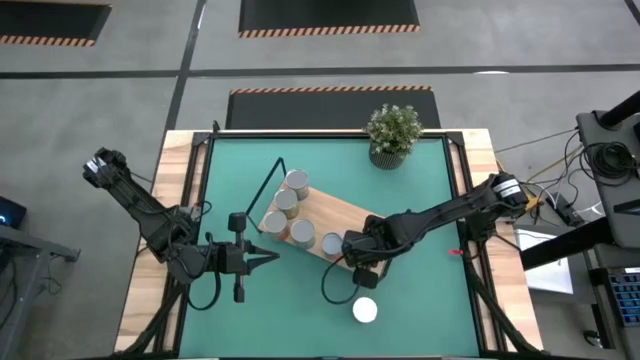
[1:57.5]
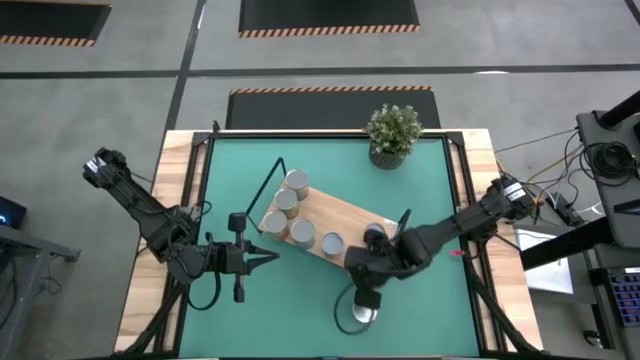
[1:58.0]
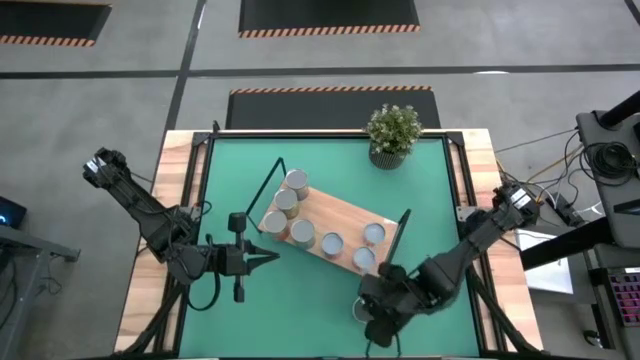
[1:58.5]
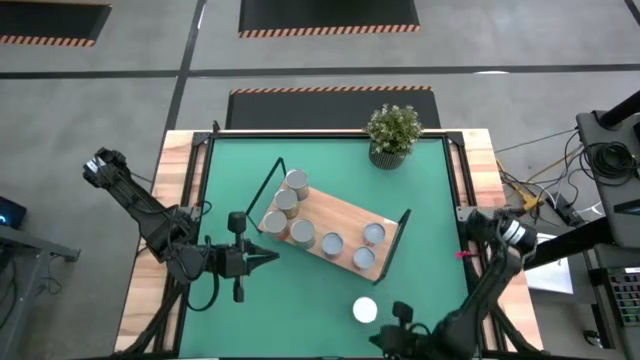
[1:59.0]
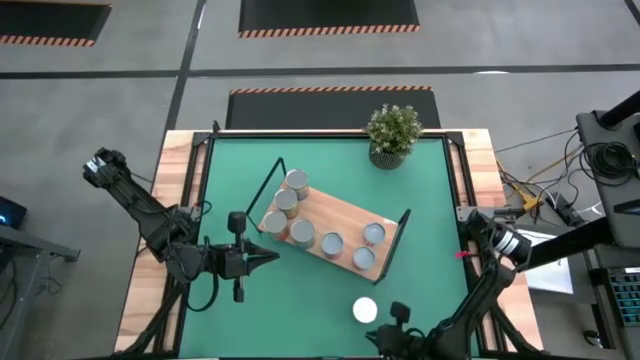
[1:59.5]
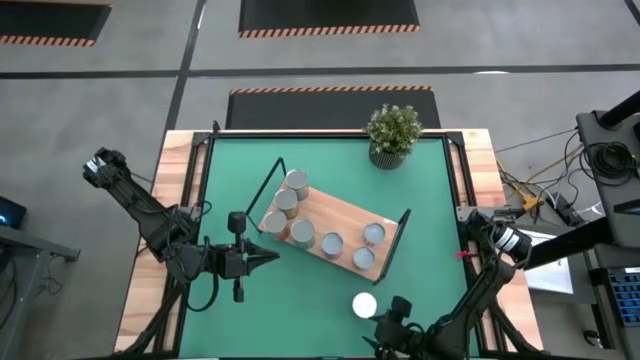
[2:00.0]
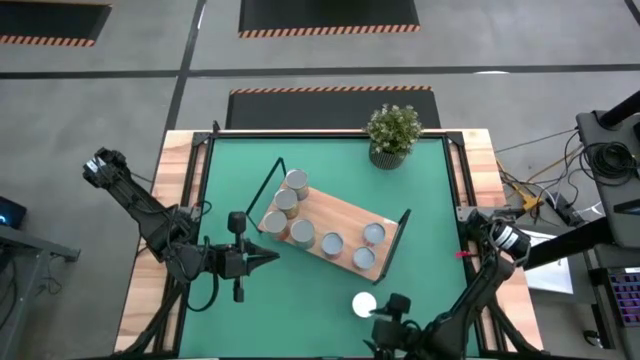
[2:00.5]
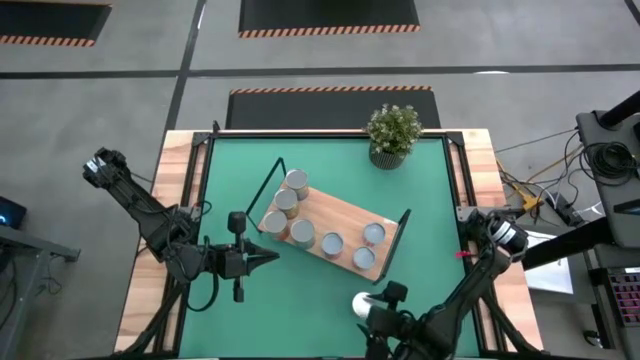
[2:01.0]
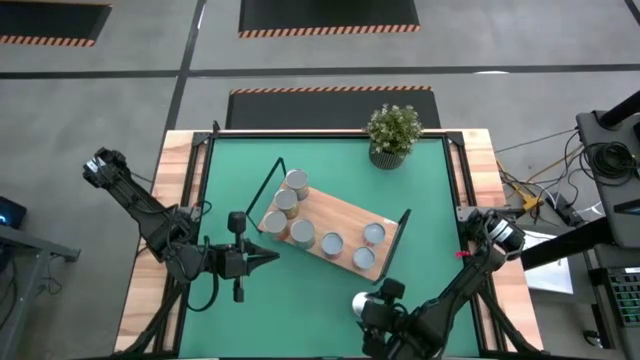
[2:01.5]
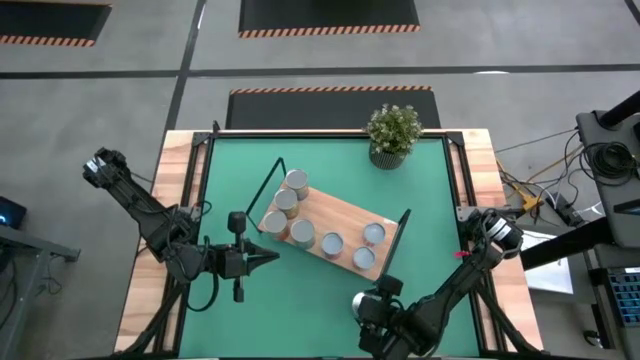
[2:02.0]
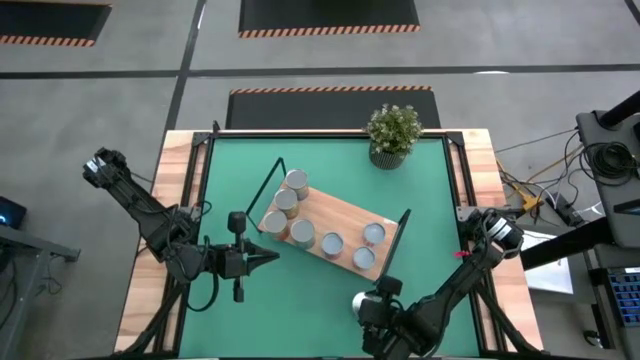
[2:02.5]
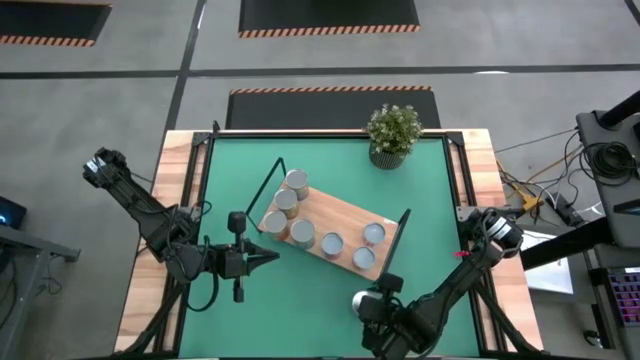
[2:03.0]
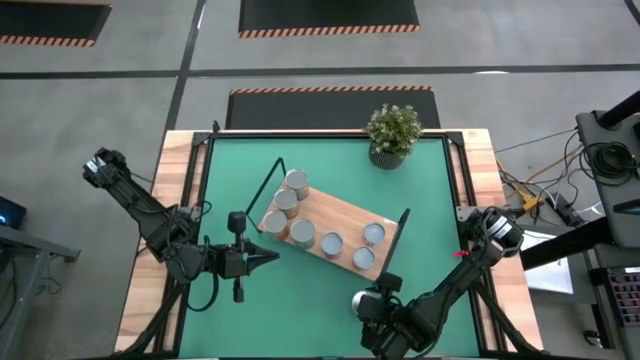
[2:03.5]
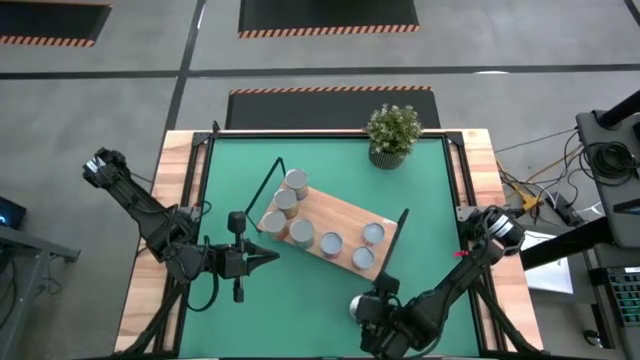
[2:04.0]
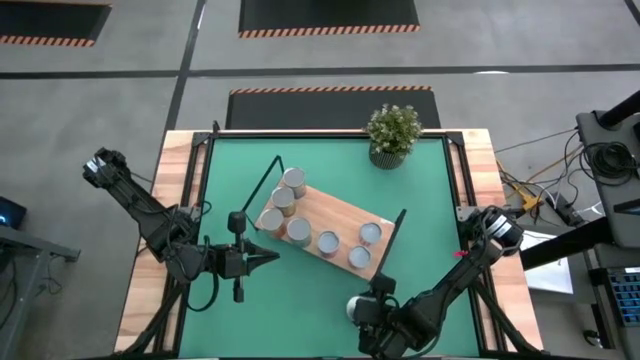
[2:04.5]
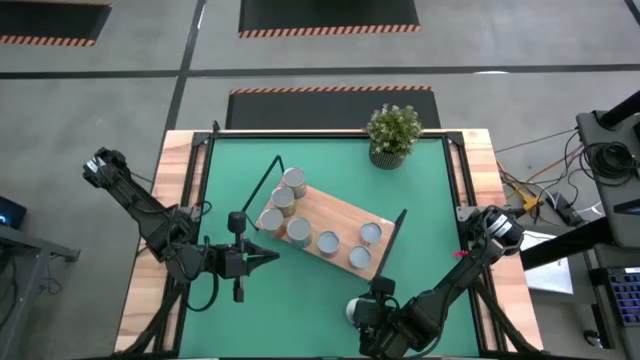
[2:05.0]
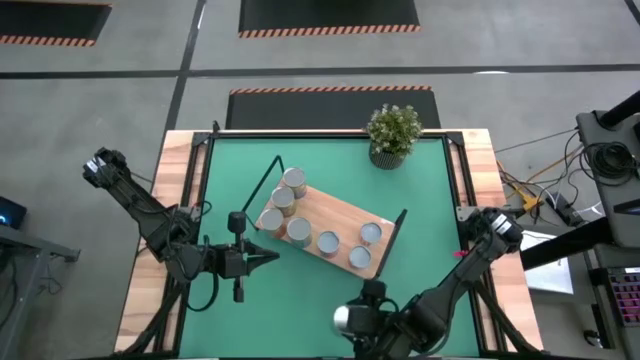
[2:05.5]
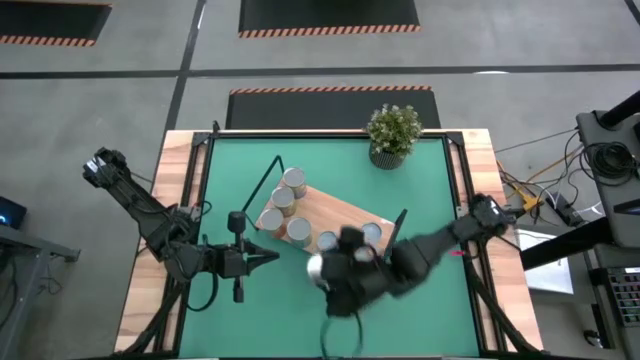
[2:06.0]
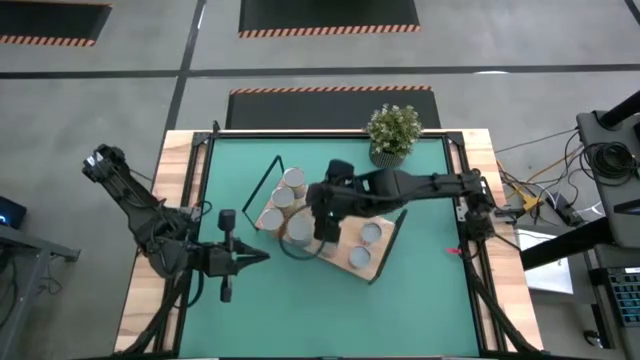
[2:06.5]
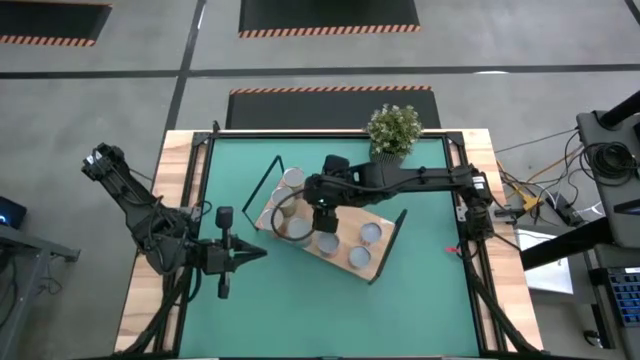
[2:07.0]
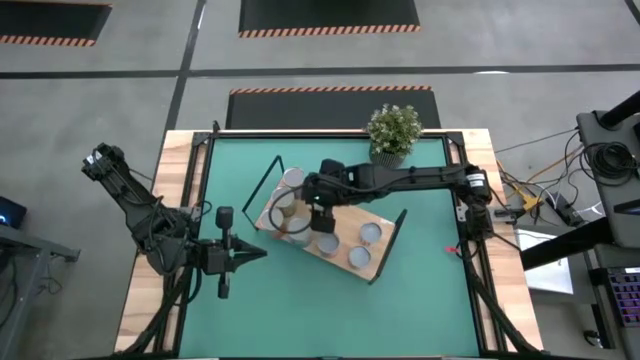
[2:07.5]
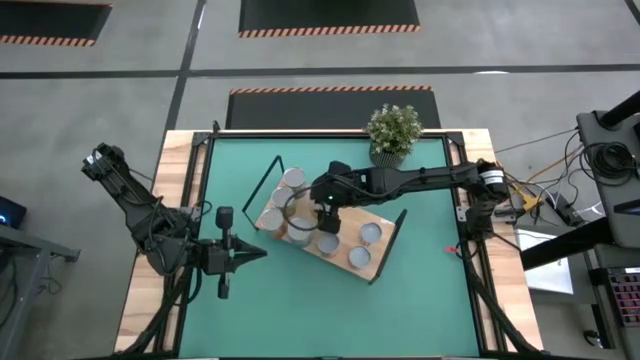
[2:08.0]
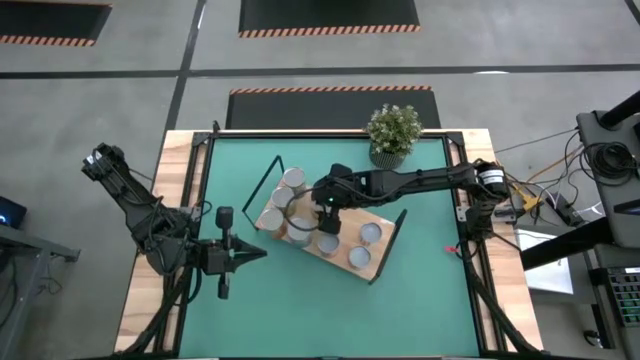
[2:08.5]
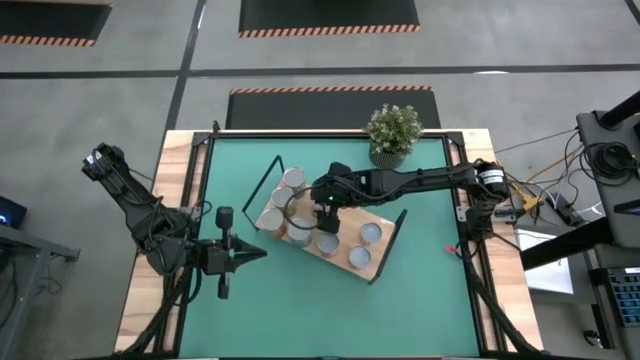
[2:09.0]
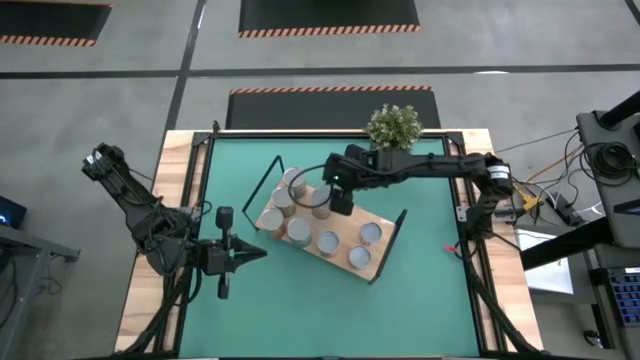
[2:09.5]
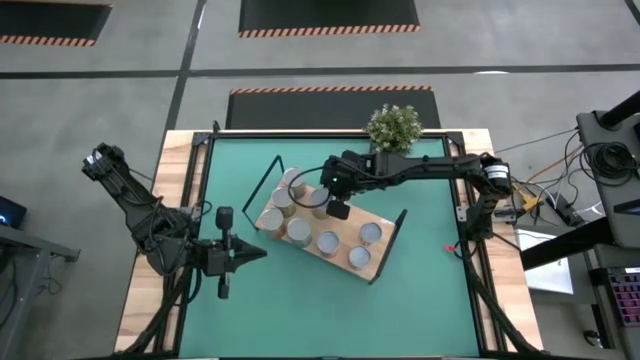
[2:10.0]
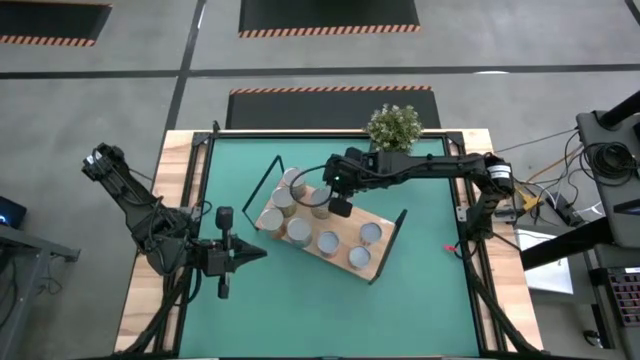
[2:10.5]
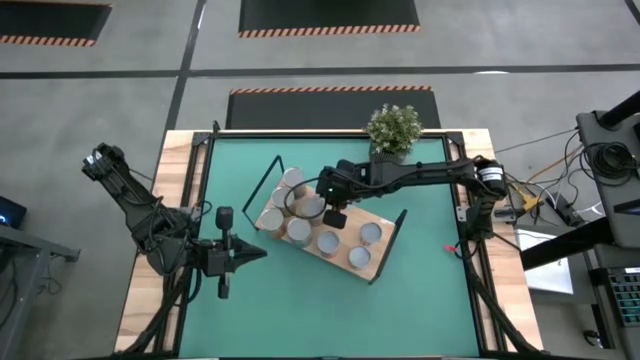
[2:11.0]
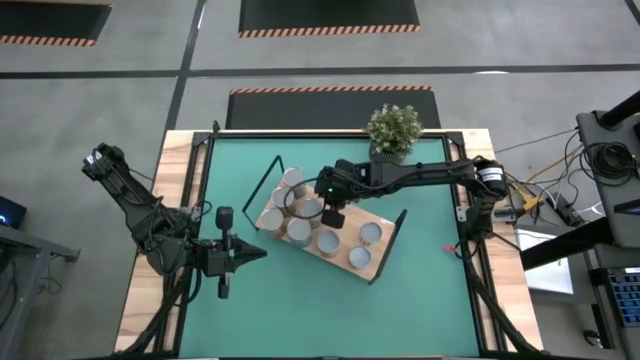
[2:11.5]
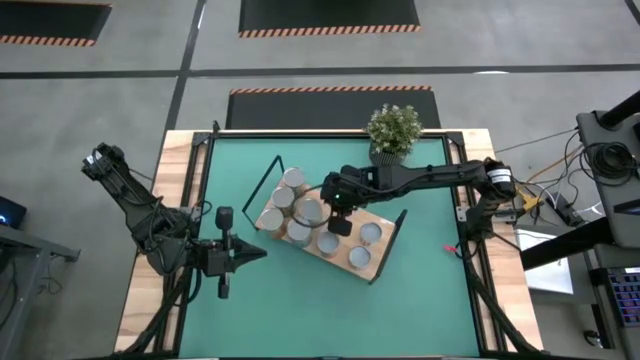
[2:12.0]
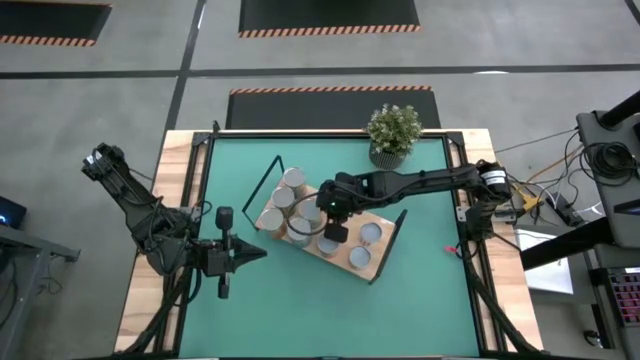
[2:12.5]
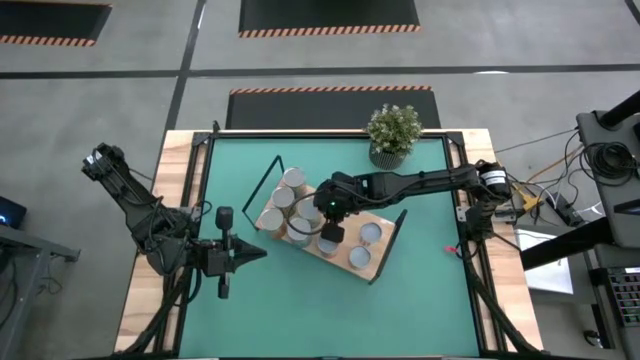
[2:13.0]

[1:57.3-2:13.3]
Task: Pick and place cans onto a shelf
Put the canned tomatoes on the shelf

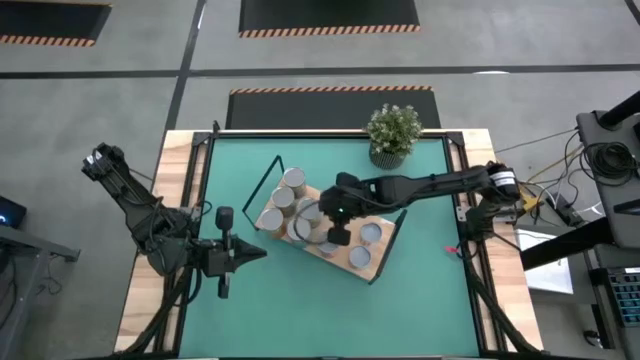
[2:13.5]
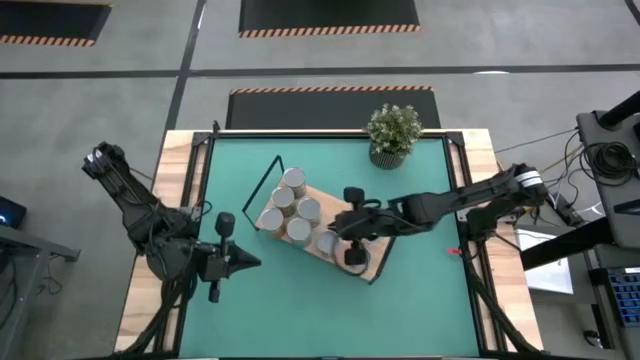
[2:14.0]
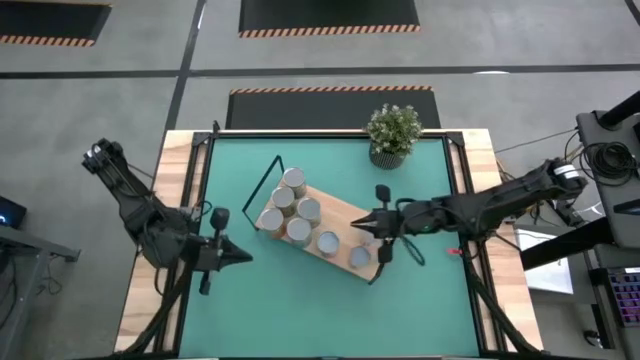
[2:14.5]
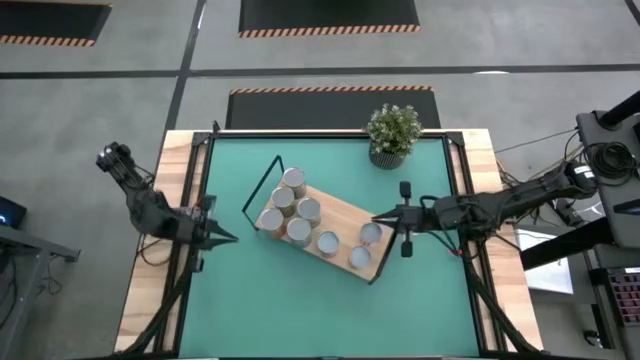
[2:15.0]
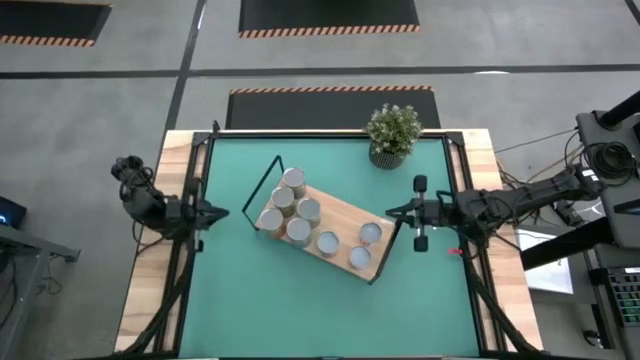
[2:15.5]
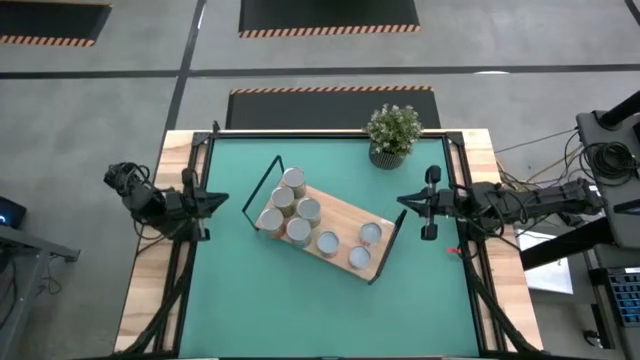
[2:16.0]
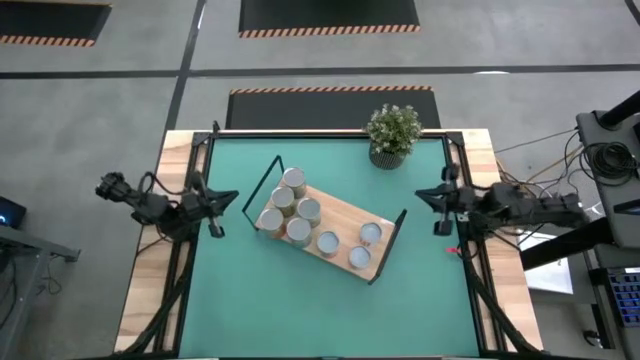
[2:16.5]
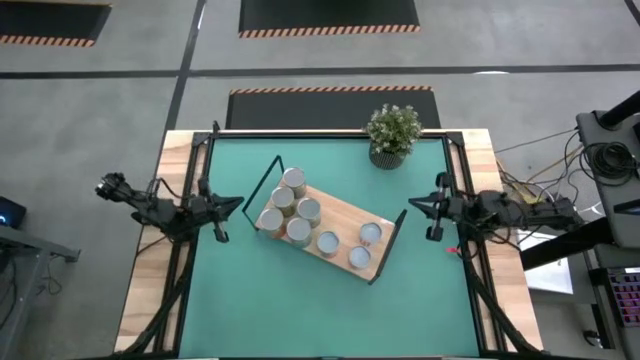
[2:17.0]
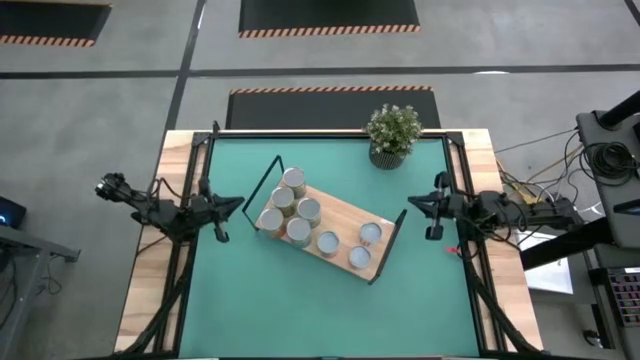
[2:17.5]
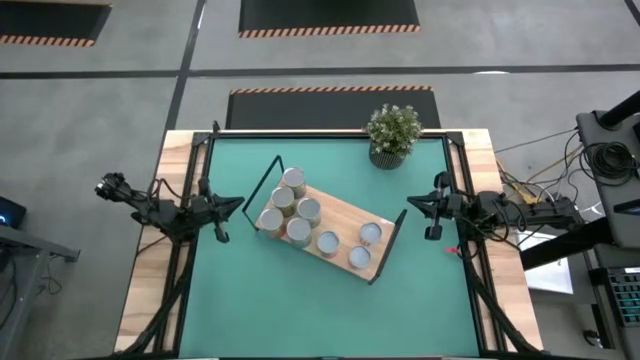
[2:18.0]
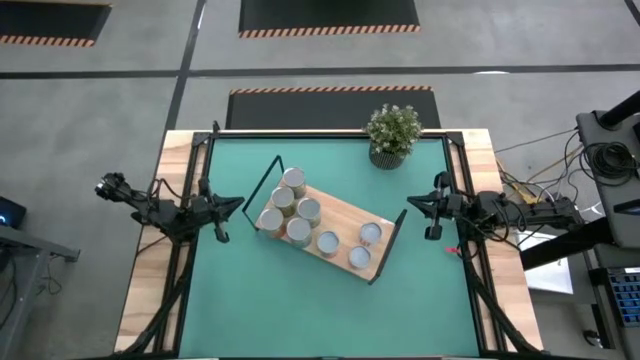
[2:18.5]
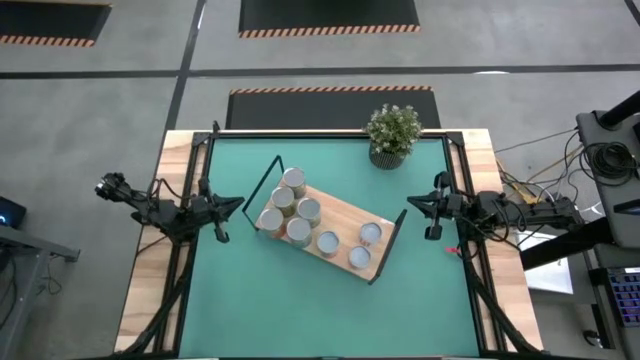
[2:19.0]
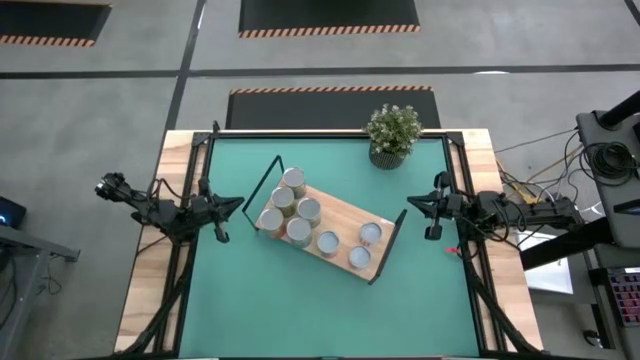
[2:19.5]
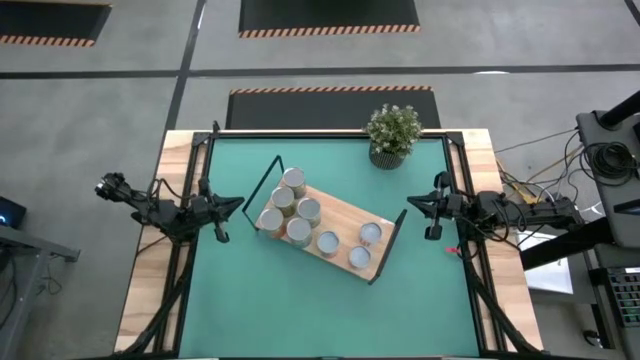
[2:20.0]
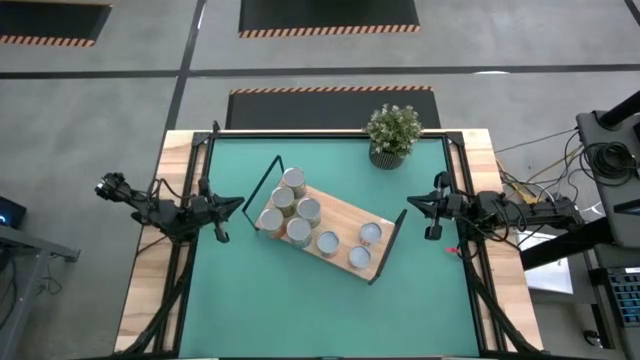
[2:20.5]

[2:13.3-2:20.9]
Return to Home Position
